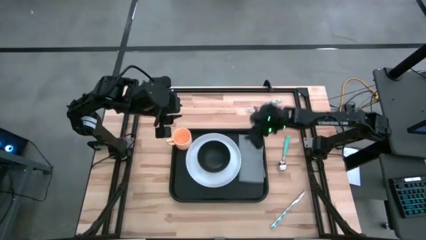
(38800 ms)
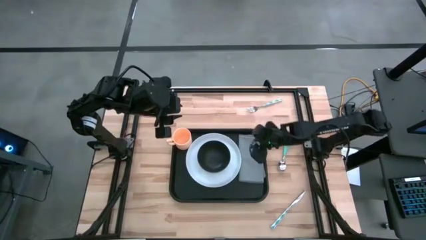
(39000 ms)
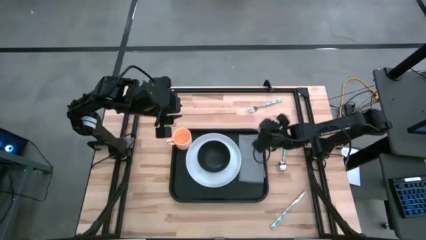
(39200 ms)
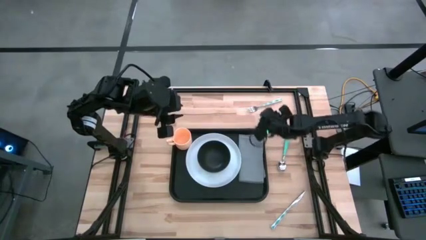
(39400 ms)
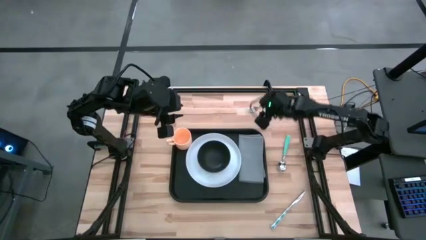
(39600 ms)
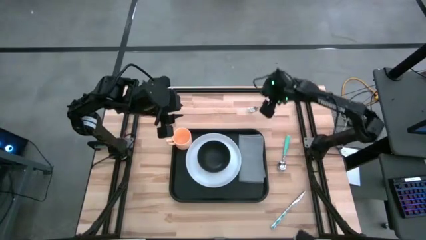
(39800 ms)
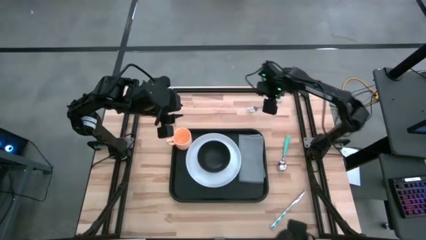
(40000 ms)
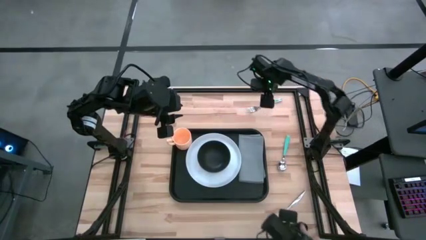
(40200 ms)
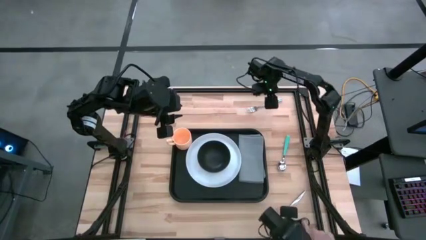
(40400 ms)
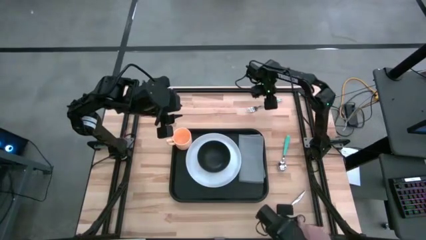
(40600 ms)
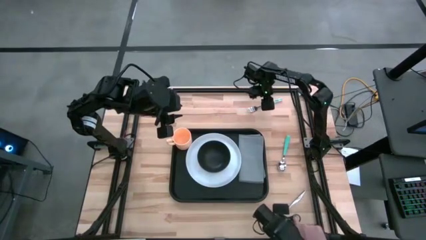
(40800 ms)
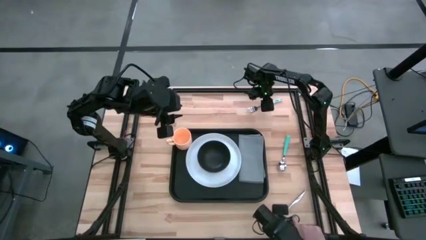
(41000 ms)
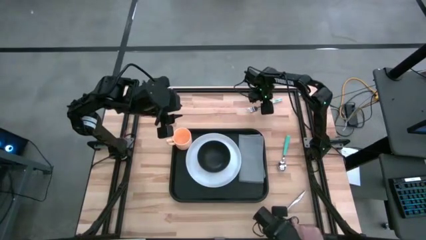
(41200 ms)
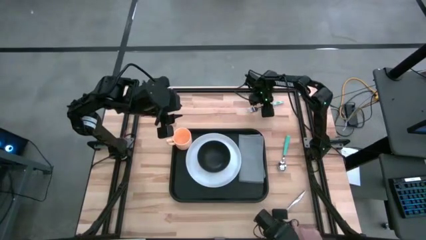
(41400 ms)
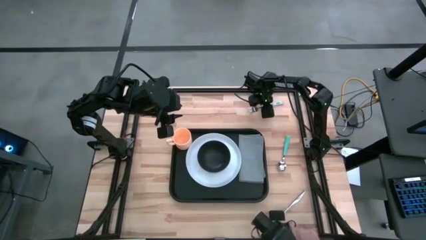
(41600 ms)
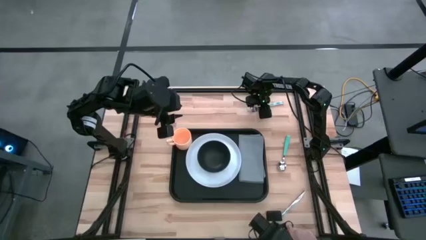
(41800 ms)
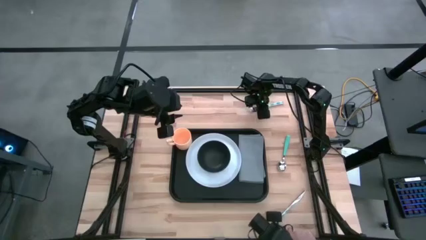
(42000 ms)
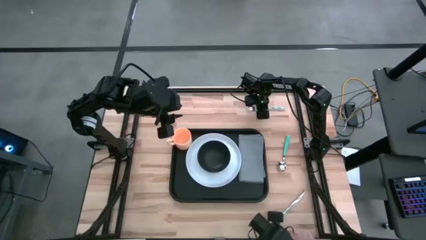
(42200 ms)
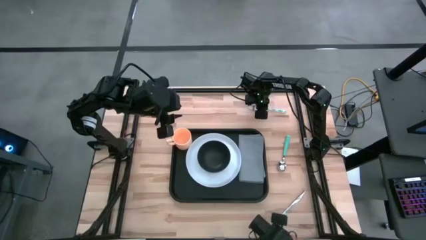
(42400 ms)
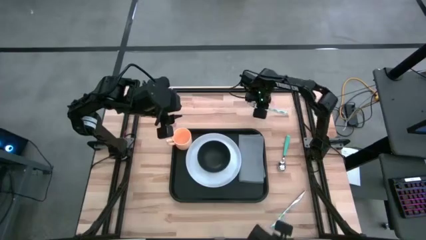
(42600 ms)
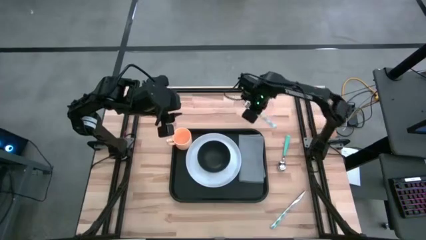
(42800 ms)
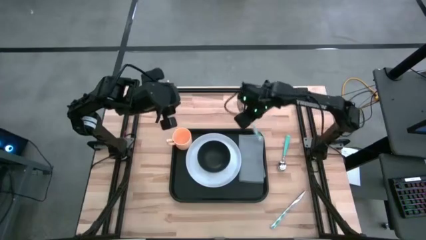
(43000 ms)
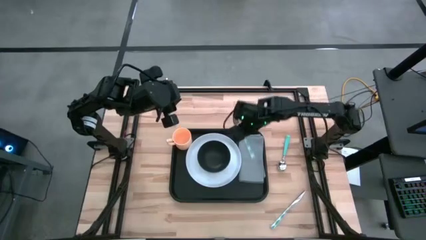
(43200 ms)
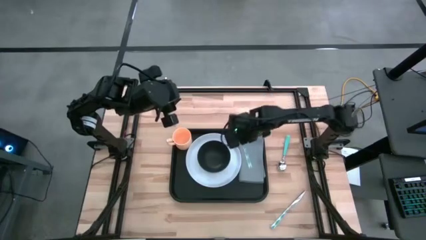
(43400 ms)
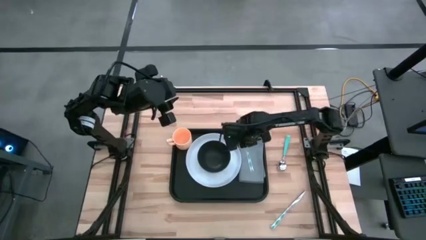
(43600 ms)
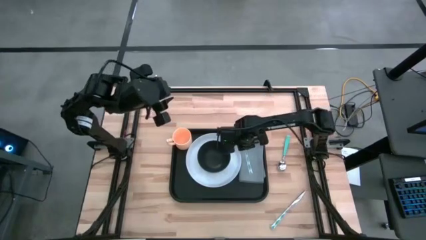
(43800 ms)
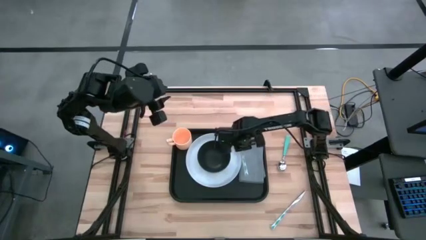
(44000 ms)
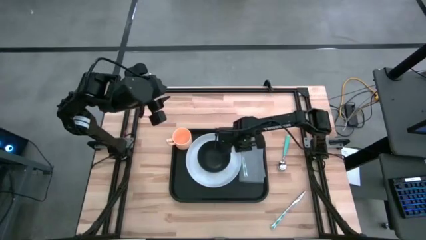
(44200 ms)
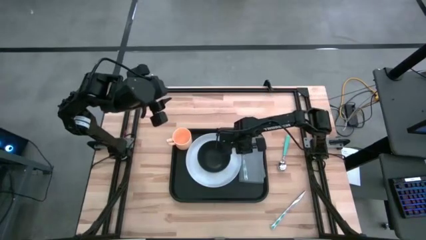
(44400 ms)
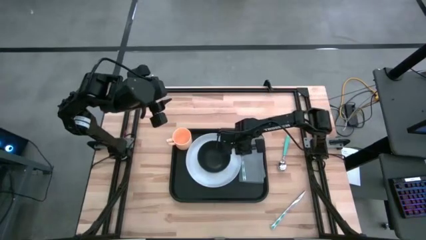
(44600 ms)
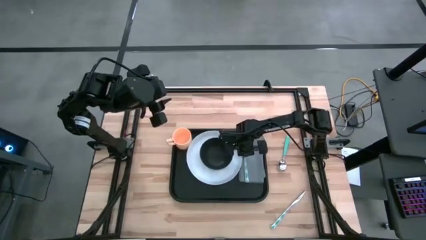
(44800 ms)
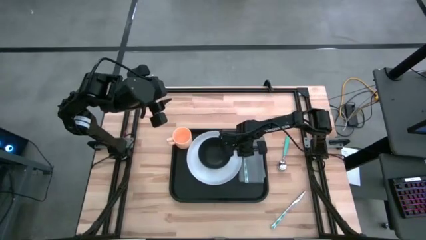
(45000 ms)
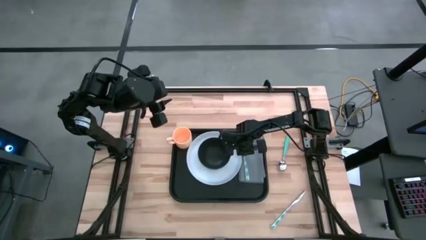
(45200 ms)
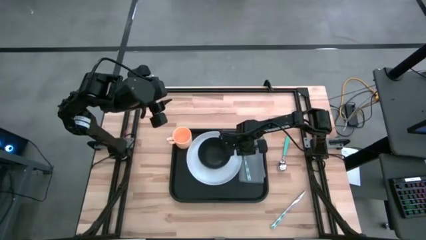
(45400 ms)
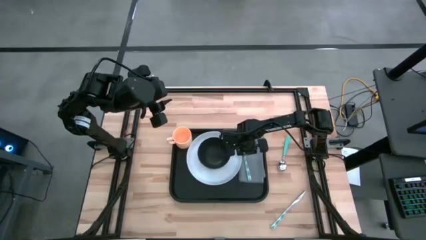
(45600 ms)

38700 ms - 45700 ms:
Task: Set up tray
Put the blue fork on top of the gray napkin on the black serving tray

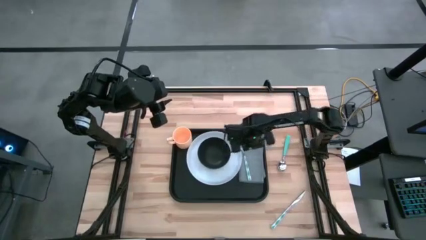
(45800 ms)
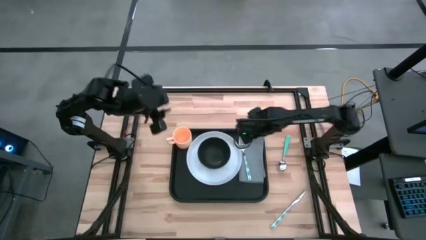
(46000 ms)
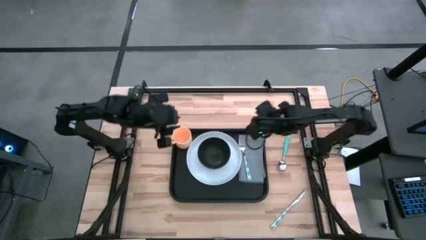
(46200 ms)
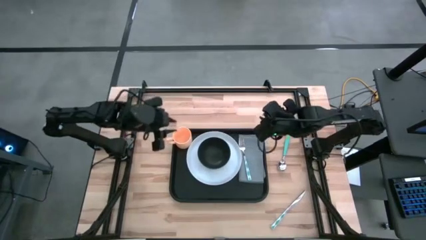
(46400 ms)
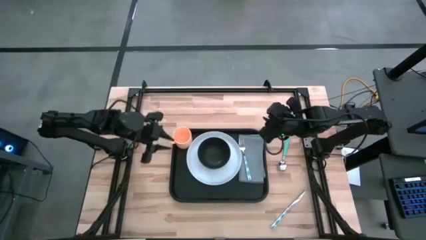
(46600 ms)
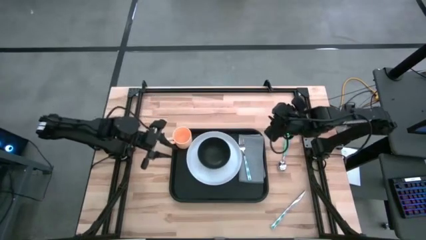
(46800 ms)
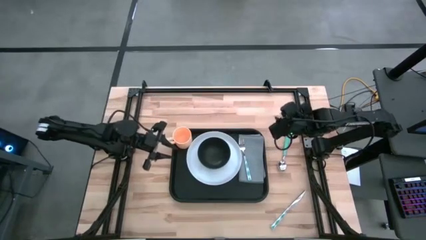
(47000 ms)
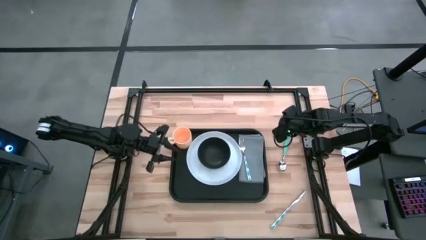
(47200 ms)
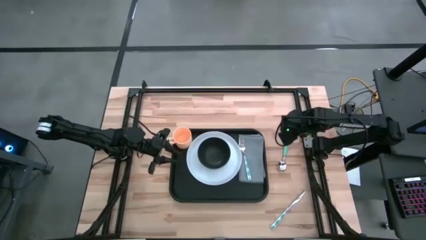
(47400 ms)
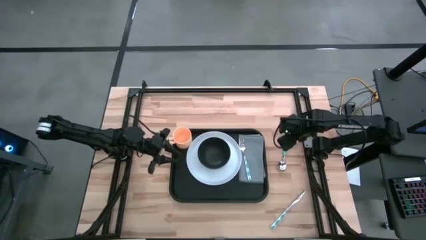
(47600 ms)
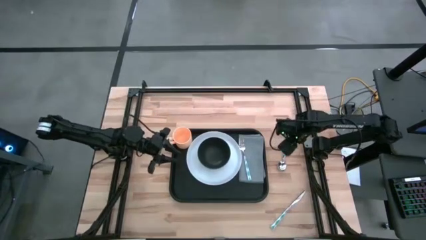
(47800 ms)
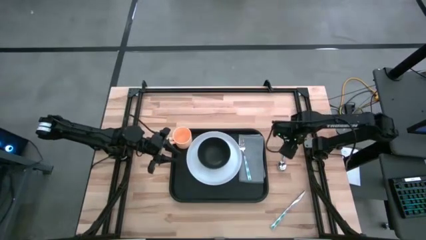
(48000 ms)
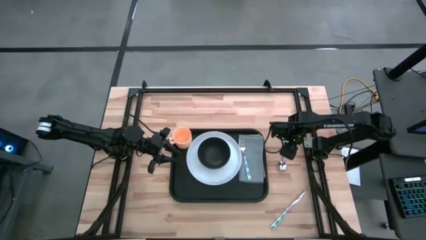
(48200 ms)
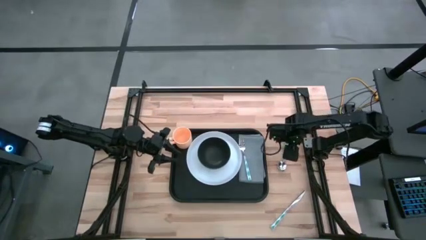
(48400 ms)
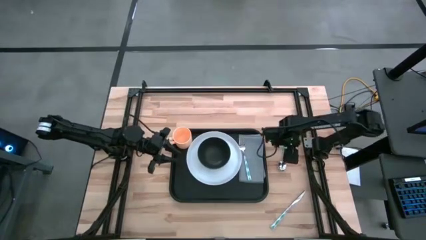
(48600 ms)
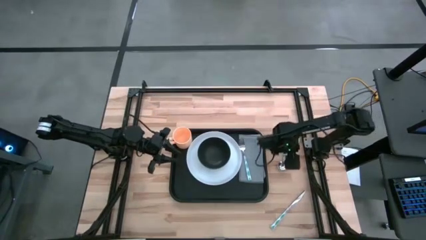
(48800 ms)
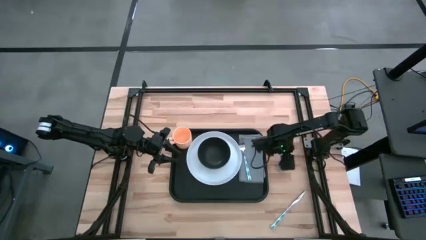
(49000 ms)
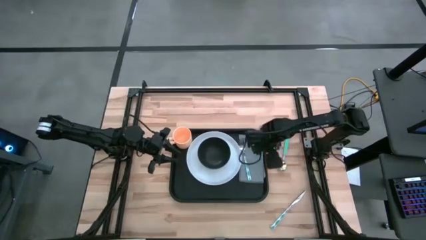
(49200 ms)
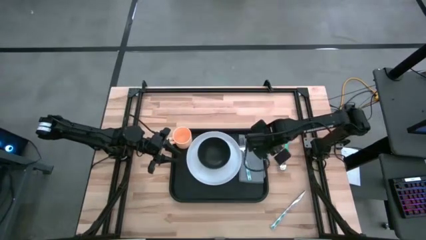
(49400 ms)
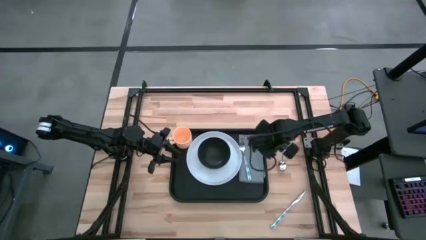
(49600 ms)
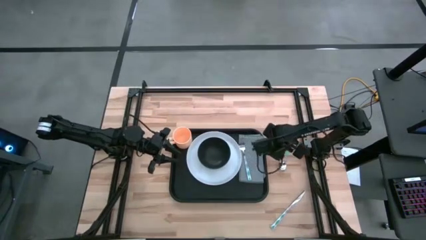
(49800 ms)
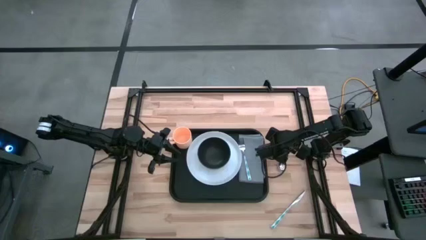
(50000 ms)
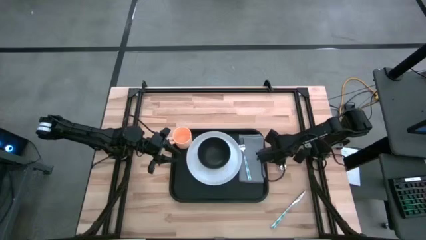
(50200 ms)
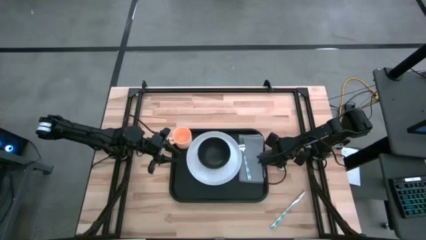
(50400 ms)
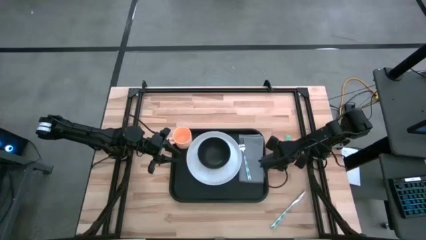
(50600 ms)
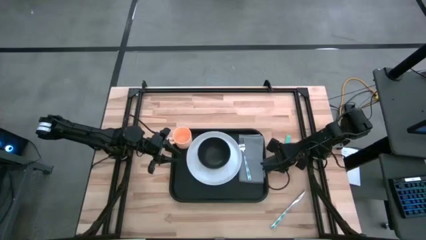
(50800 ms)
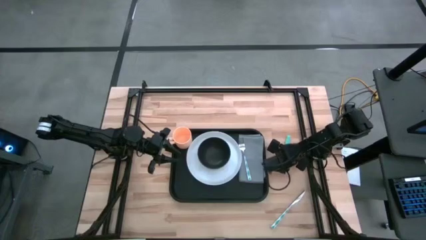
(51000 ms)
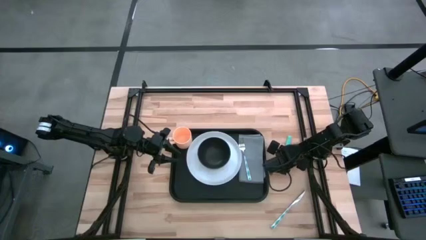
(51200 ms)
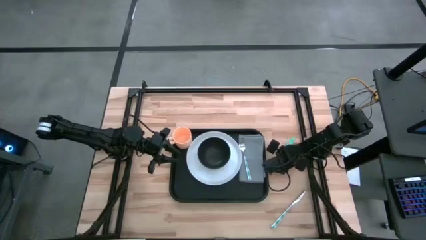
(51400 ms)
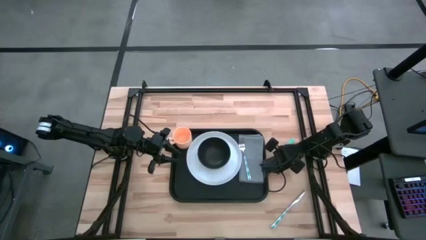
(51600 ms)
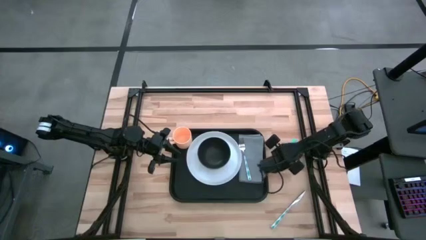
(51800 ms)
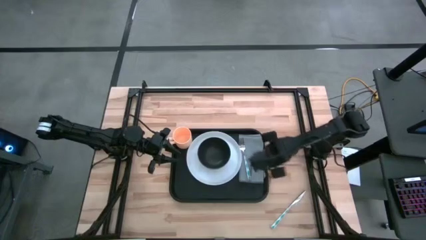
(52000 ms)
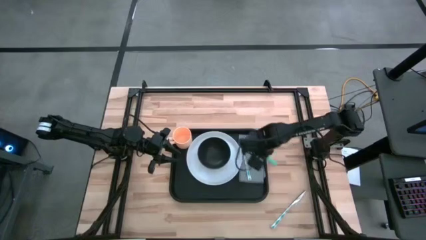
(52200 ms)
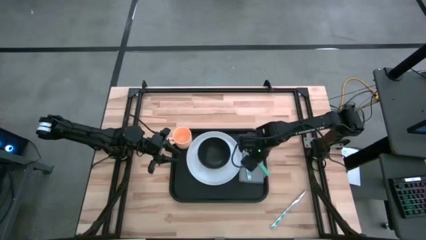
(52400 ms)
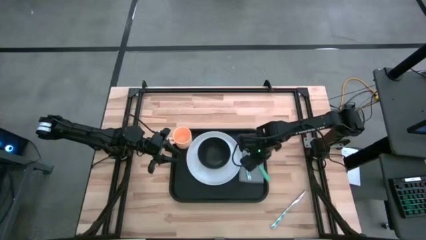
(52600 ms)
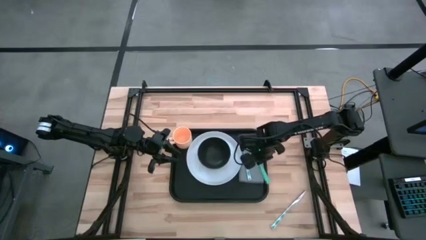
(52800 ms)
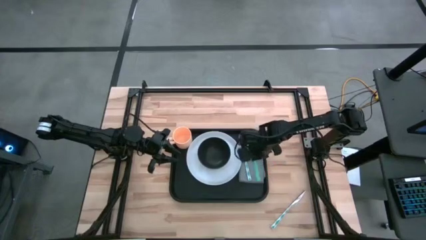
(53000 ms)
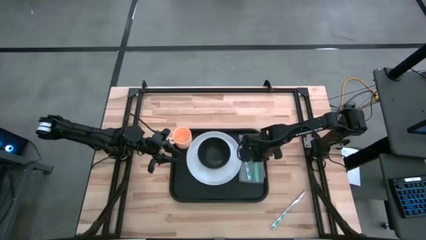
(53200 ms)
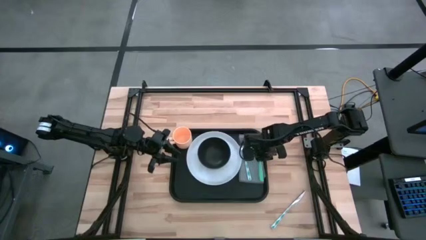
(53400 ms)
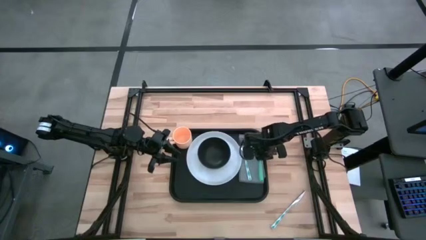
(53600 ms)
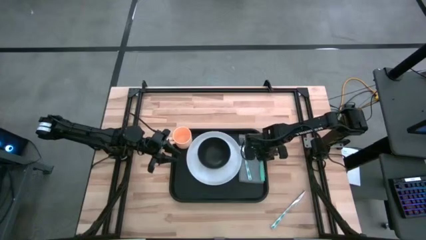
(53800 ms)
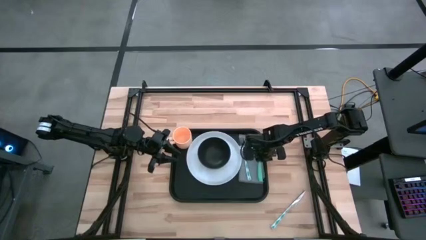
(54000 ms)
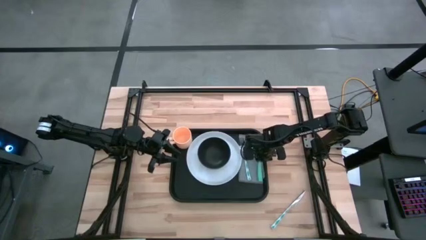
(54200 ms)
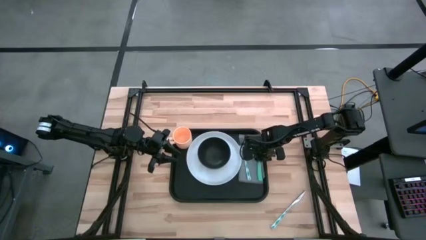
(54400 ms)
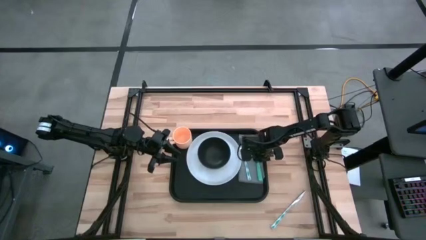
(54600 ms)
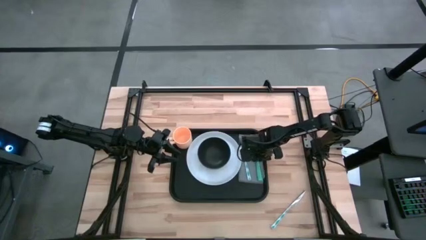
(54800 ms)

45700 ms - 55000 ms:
Put the blue spoon on top of the gray napkin on the black serving tray
